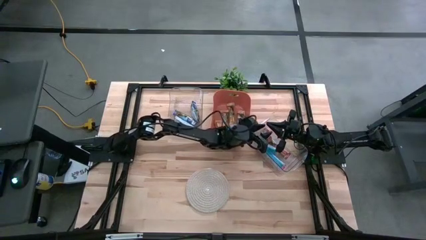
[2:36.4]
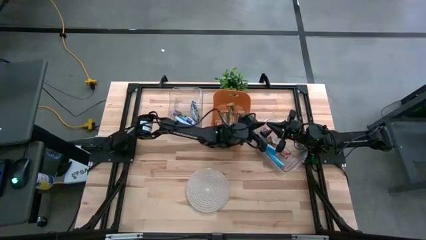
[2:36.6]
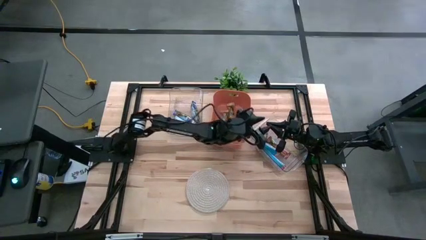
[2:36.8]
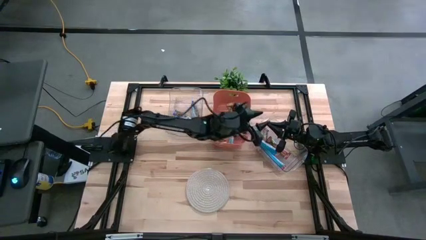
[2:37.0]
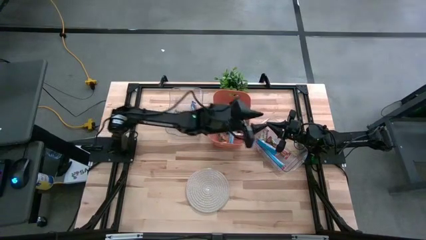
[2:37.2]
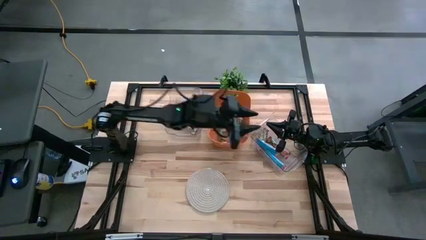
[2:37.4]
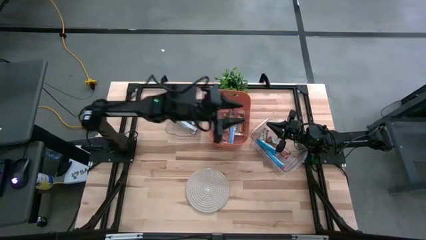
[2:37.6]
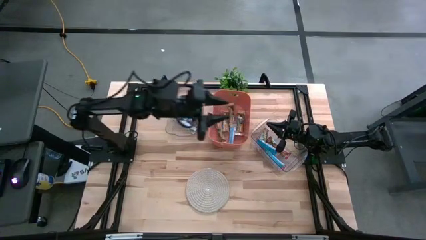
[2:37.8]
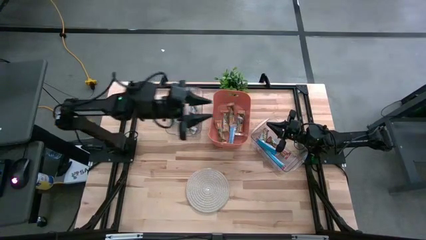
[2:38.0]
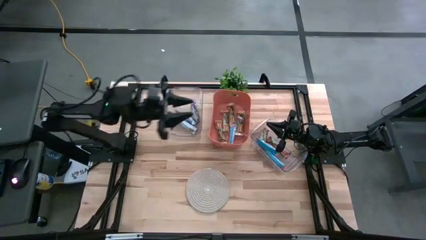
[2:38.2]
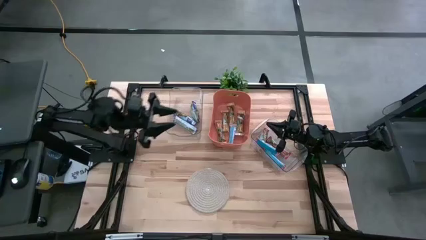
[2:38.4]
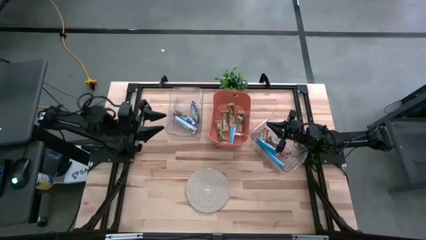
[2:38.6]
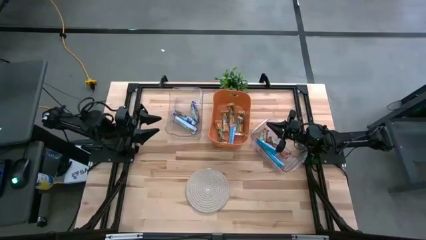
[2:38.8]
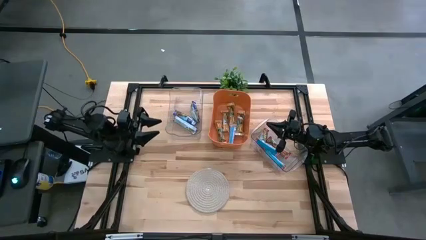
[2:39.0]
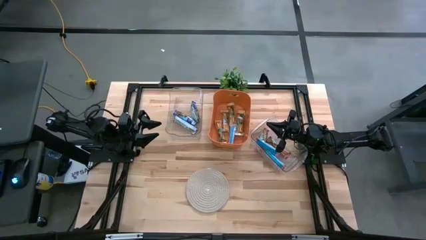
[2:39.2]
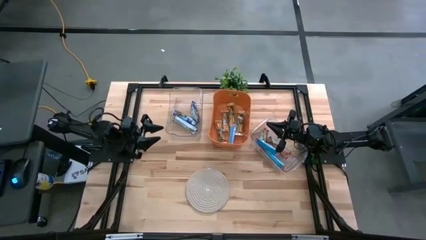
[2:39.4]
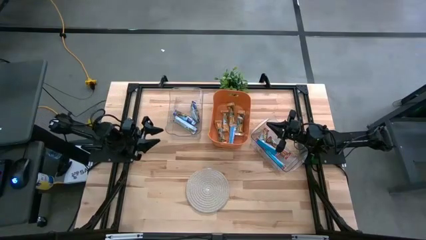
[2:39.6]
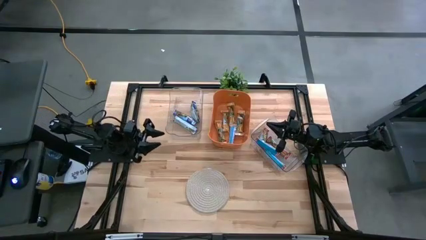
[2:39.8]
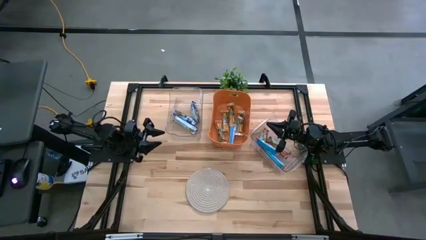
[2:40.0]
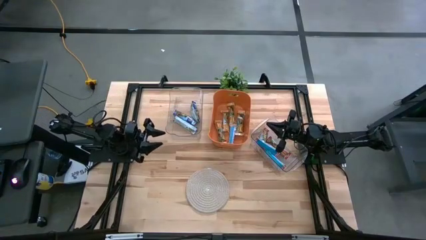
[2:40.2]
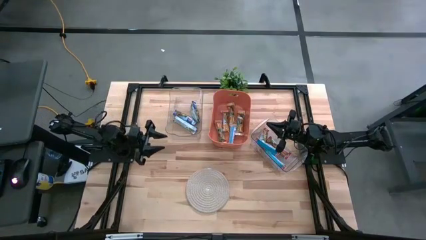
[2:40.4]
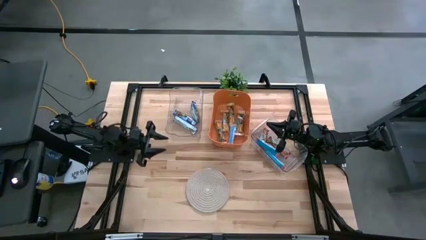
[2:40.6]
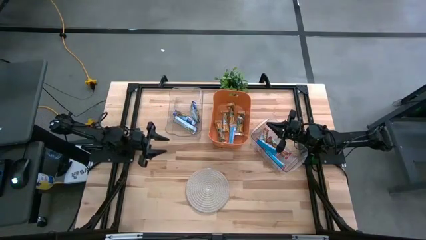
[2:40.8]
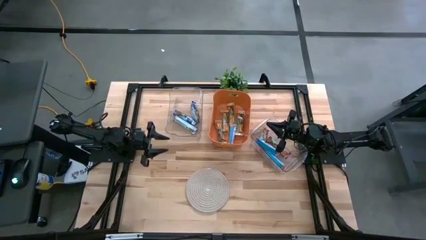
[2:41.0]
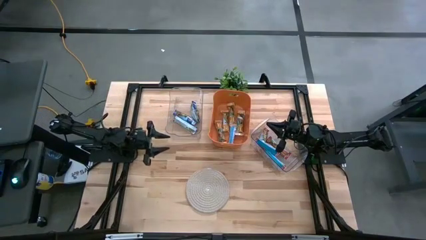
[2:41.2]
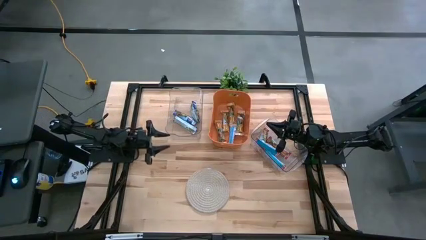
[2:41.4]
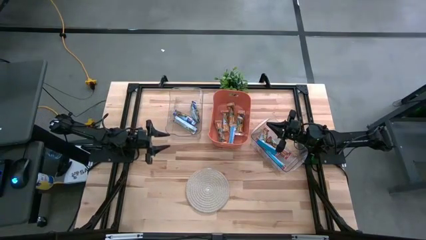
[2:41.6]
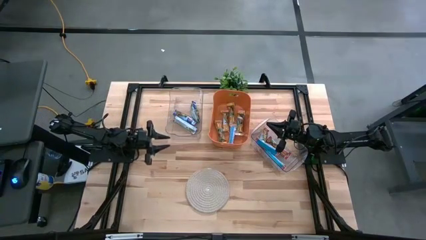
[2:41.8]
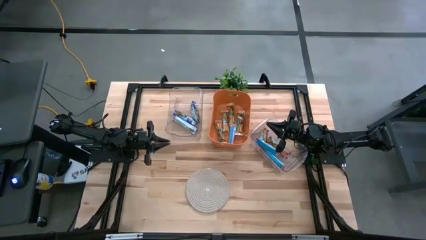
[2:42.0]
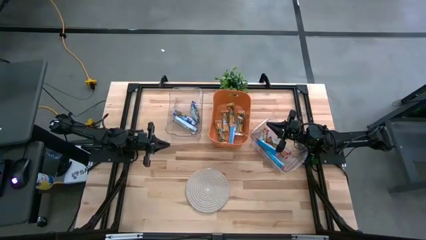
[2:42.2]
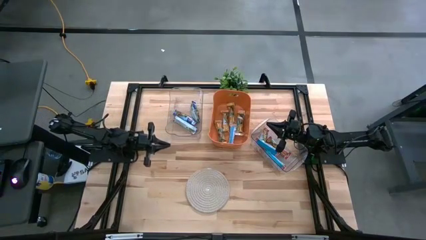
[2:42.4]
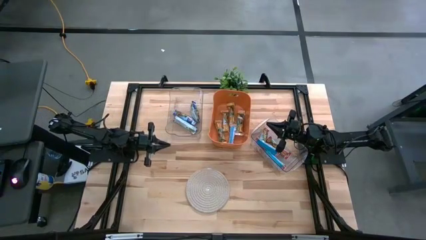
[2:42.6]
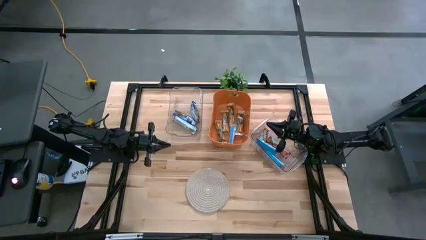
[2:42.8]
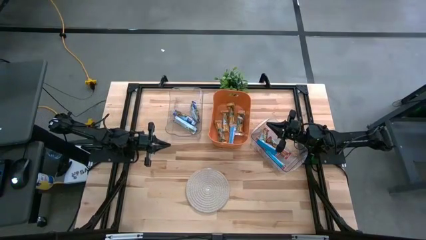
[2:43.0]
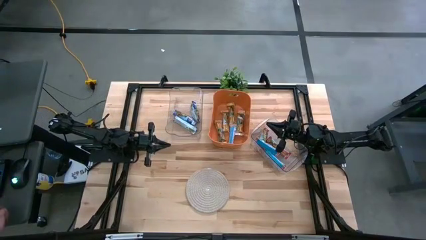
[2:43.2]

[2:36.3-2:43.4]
Task: Pick and place Granola Bars by type
Return to Home Position

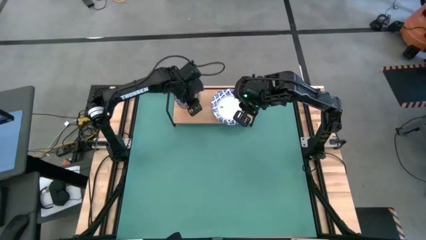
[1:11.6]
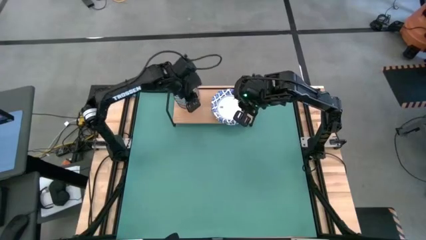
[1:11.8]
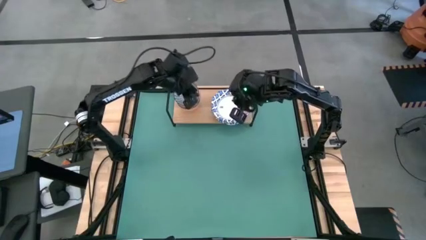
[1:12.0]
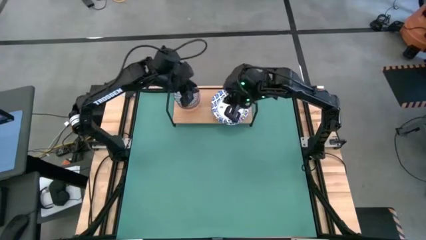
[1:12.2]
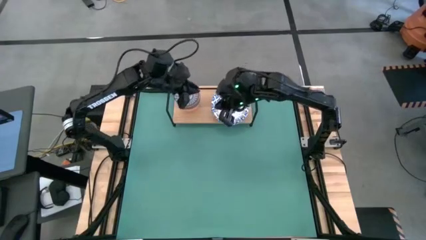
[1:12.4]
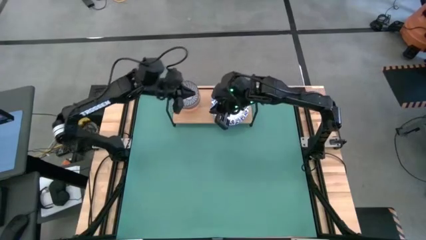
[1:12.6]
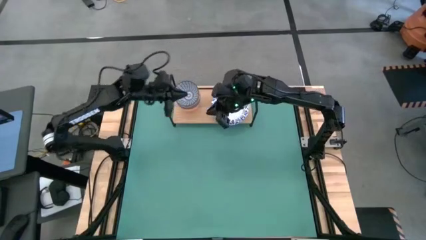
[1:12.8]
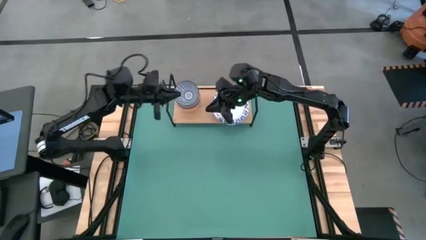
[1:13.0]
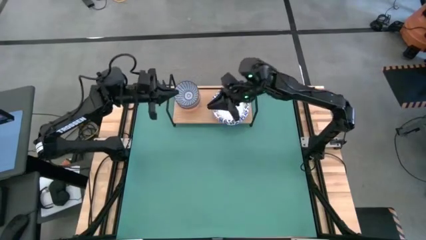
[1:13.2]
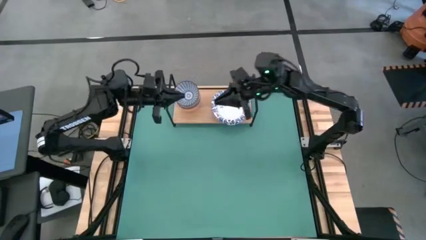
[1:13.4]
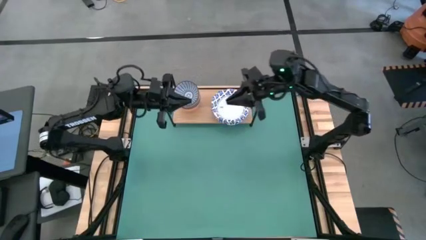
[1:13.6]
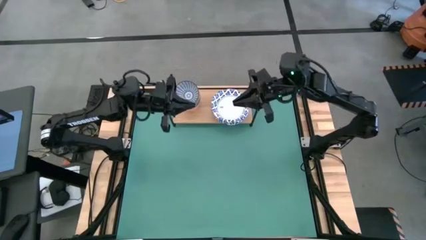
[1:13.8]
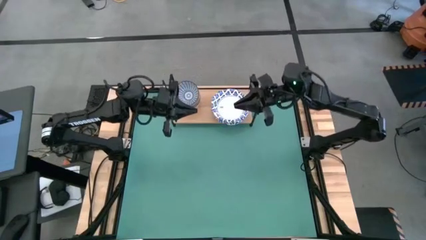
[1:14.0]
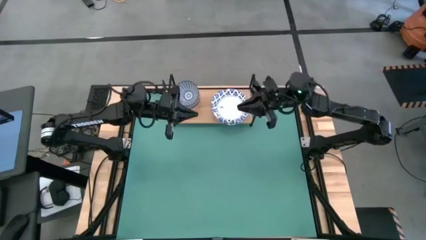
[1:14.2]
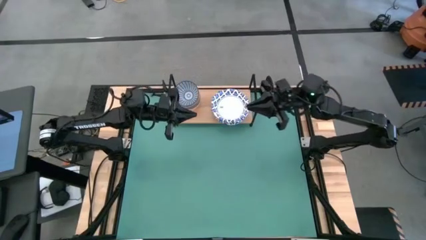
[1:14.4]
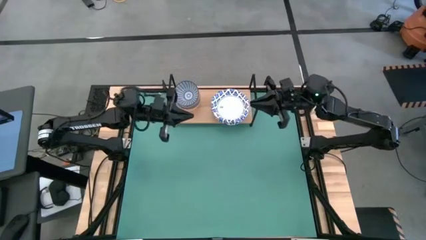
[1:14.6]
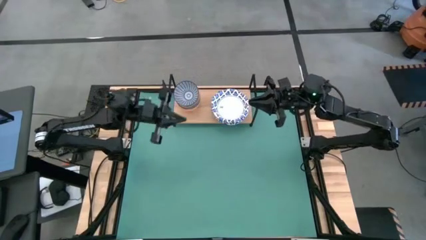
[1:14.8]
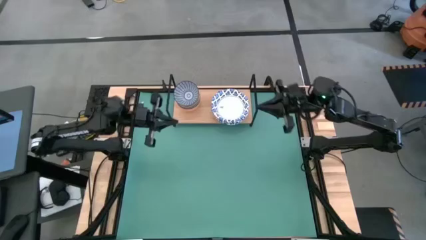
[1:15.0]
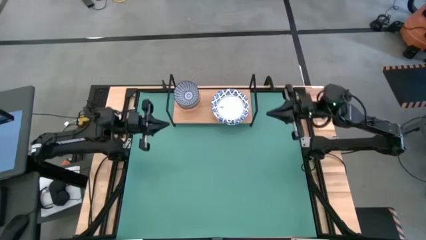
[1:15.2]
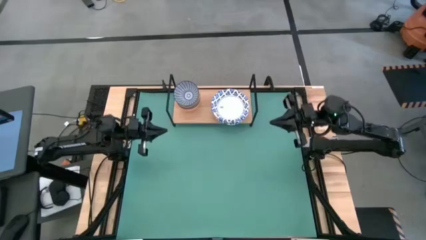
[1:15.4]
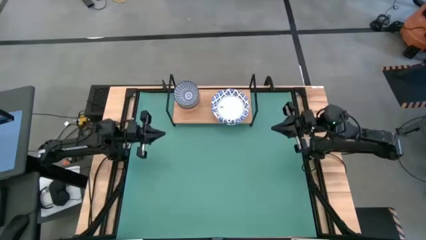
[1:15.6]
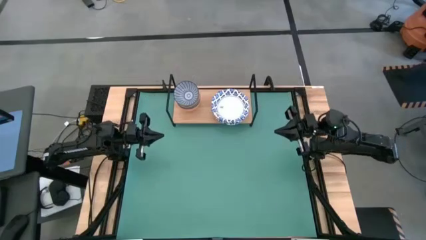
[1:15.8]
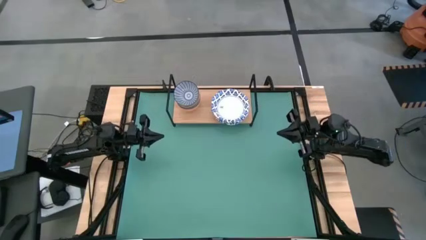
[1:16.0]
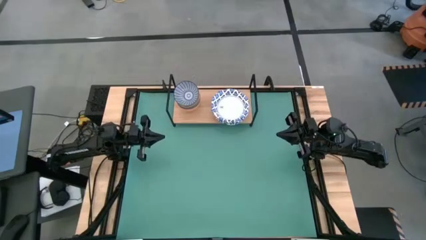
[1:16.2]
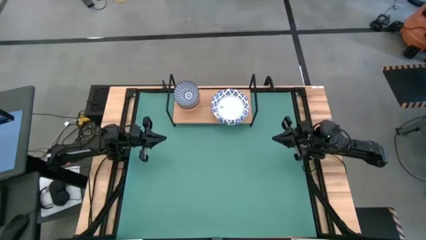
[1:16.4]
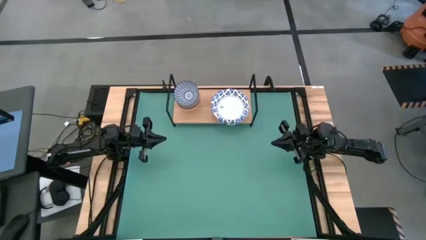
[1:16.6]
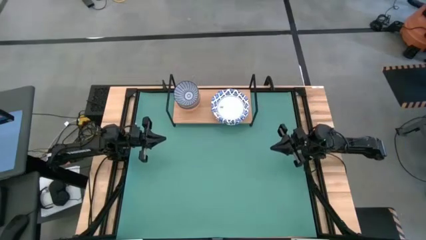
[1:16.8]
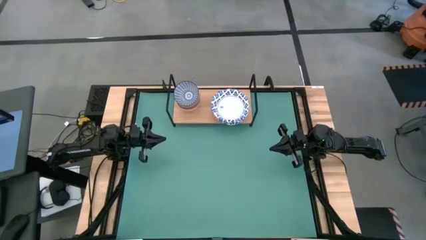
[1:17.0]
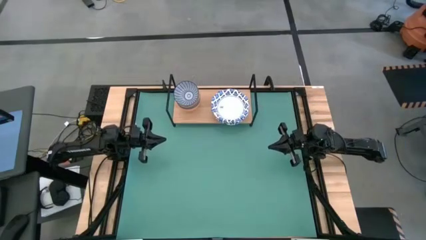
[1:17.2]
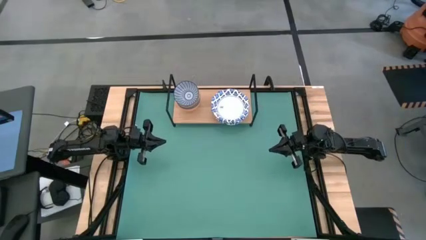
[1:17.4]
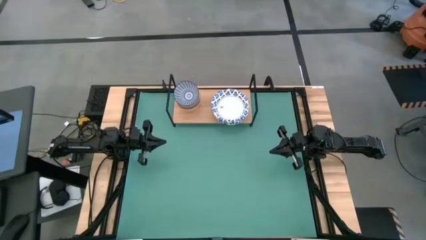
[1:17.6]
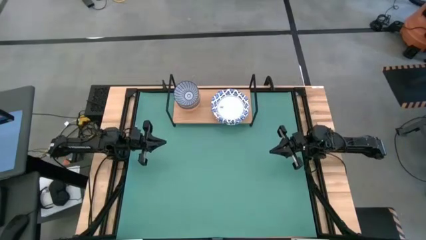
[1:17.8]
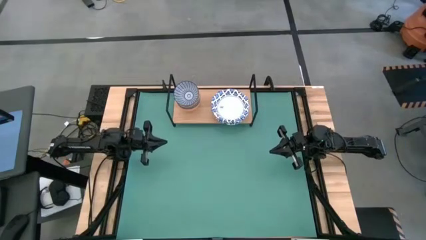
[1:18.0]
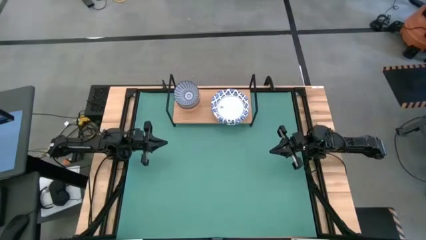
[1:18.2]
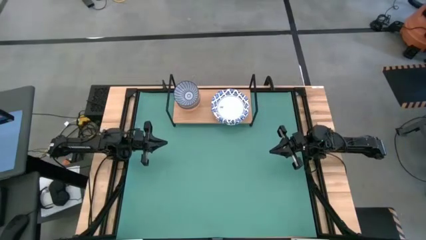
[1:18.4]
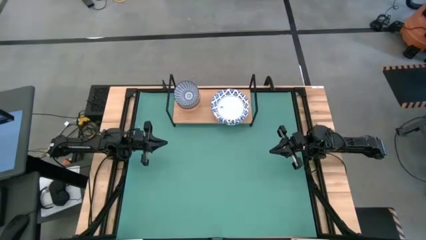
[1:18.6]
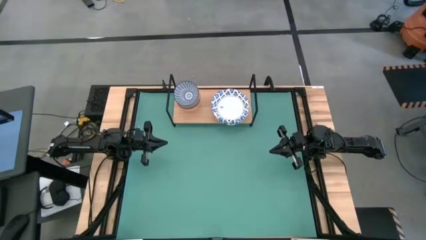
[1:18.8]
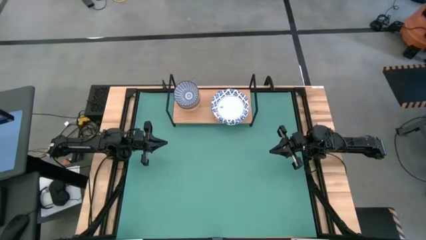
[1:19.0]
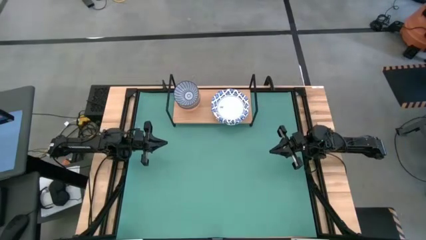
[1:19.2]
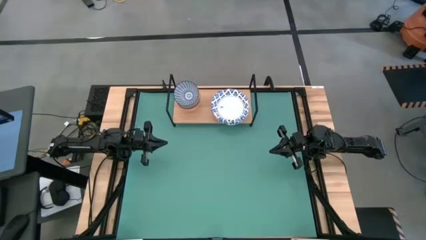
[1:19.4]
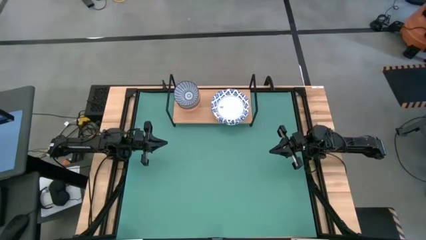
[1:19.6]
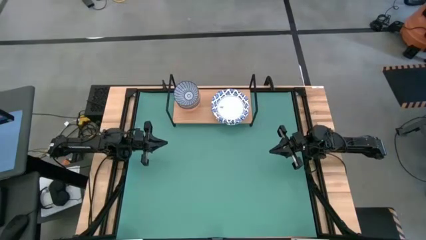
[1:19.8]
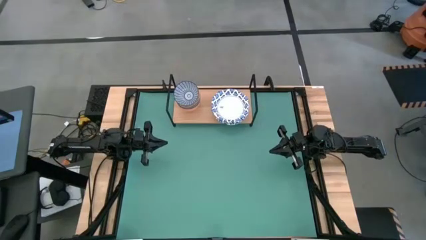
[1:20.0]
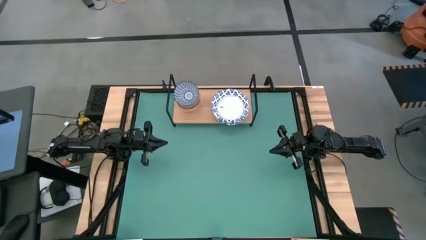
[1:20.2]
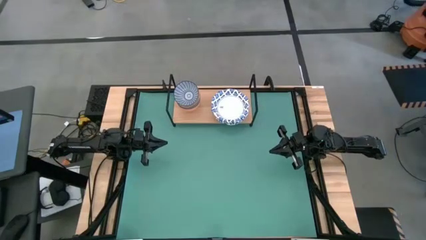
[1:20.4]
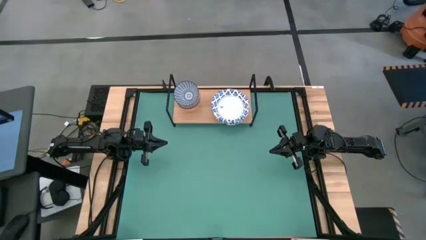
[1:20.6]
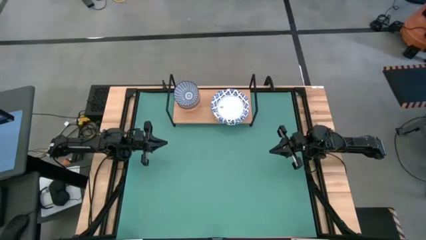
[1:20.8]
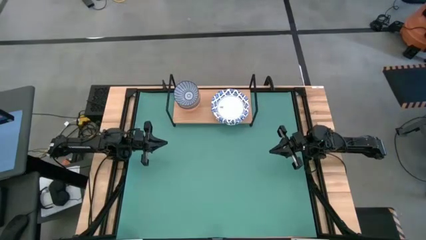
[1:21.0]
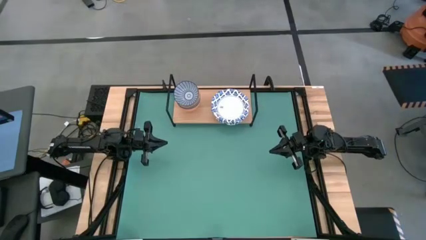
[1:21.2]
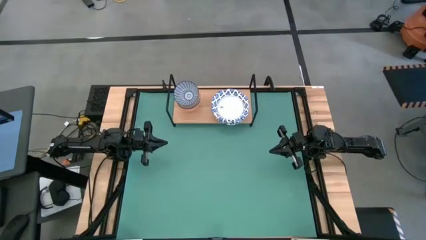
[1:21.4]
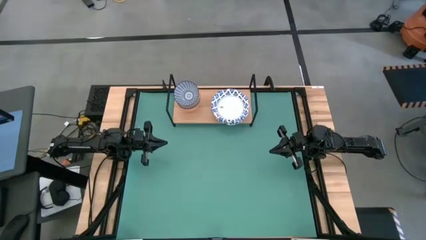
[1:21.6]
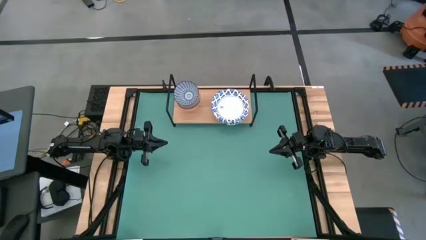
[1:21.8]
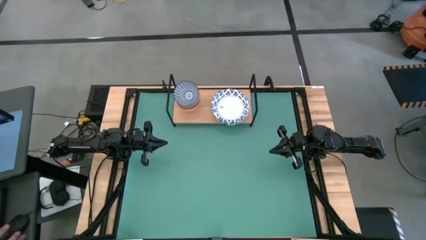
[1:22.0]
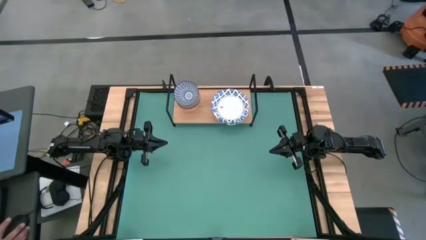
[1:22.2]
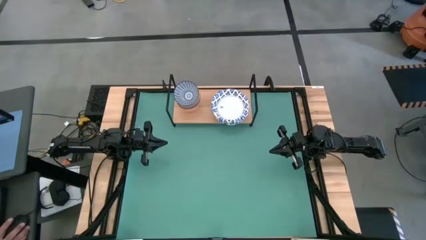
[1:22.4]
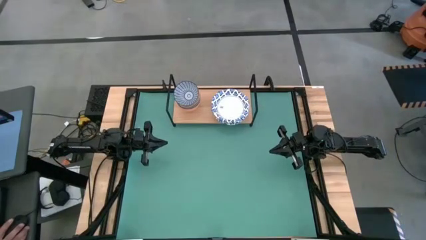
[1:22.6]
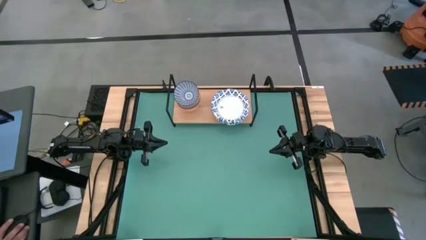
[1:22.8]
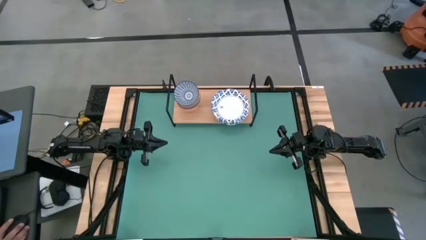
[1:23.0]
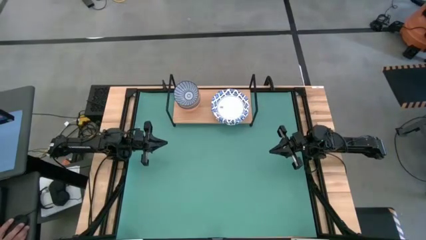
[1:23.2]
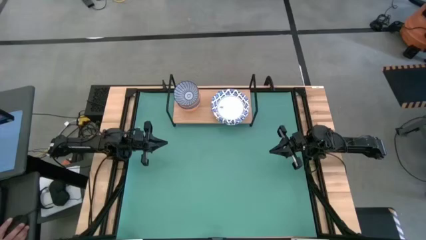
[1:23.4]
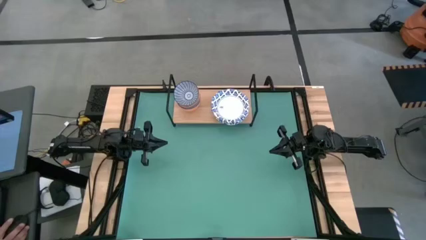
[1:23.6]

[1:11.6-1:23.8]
Task: Place and stack bowls onto a shelf
Return to Home Position
